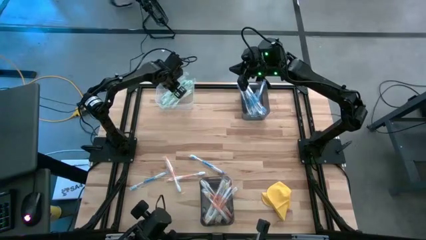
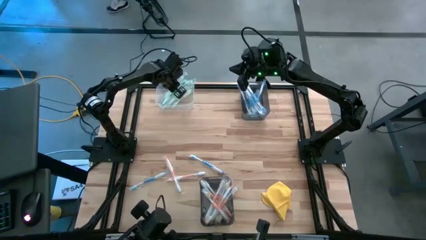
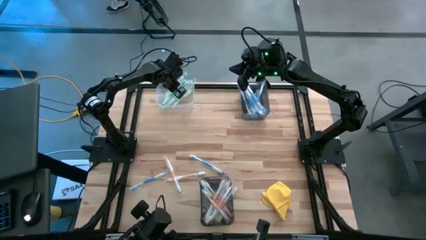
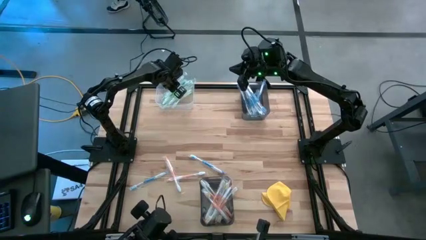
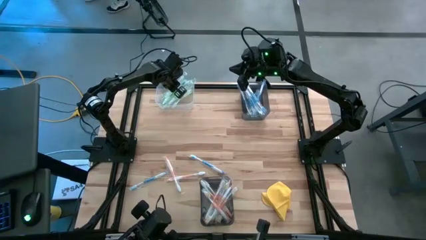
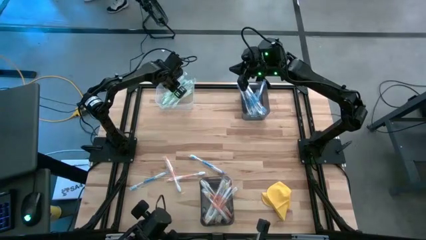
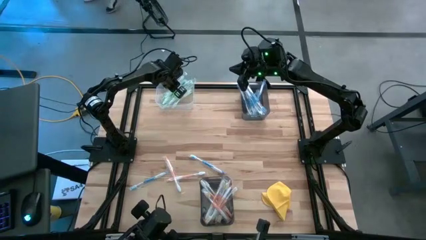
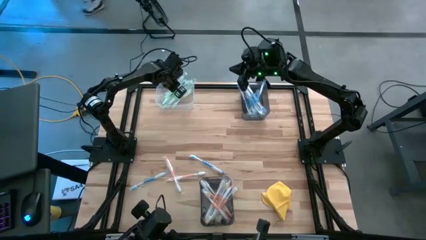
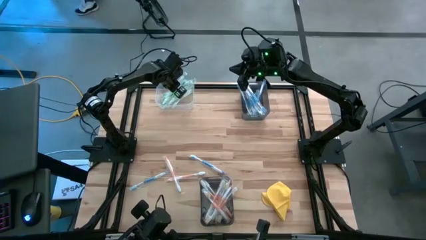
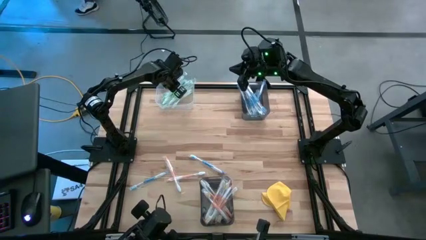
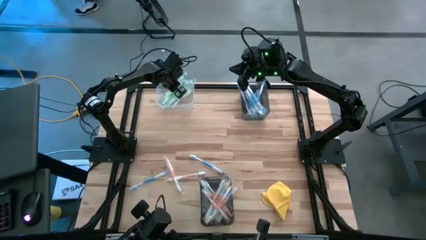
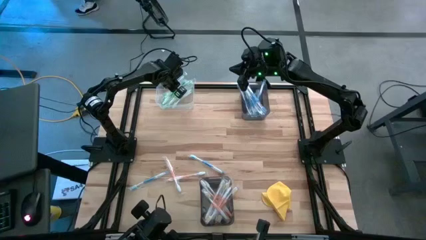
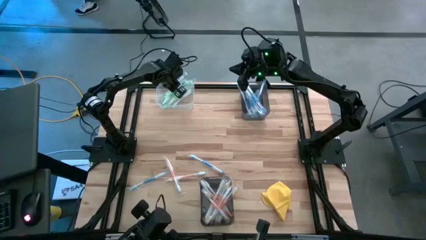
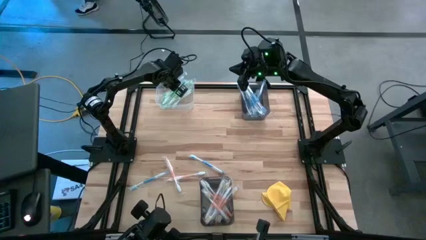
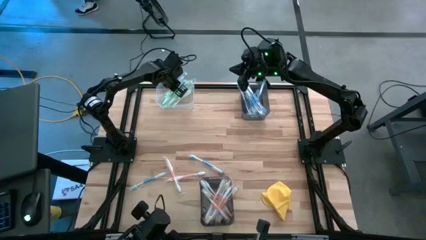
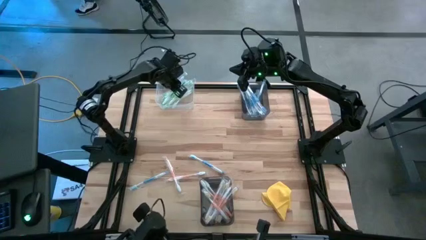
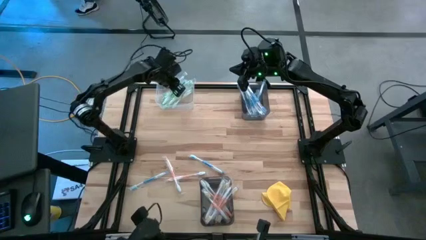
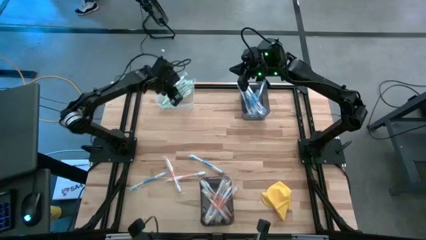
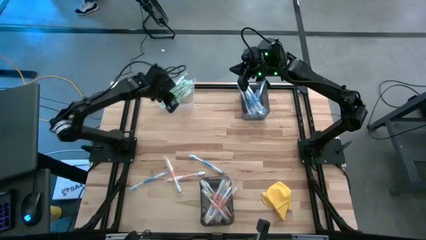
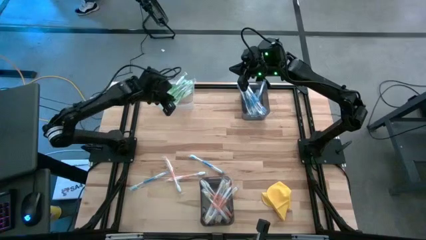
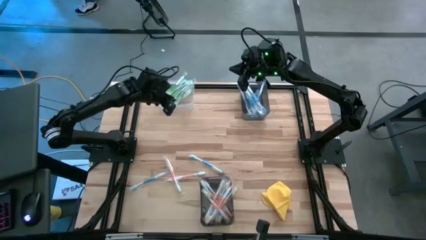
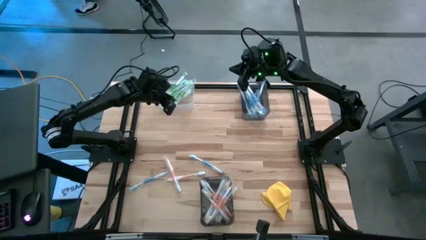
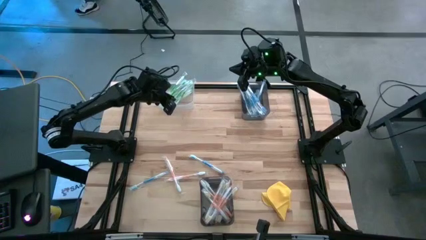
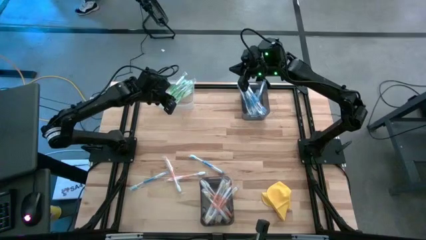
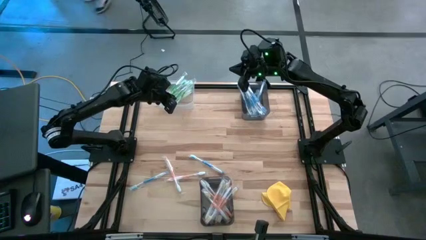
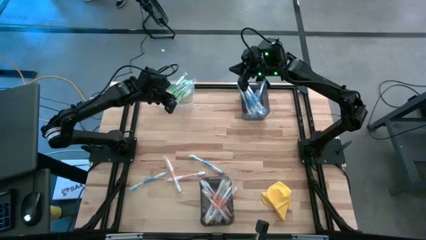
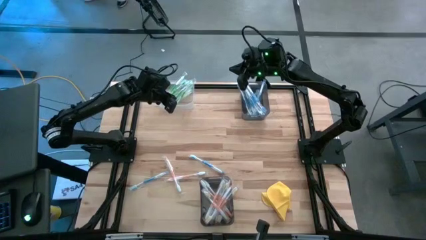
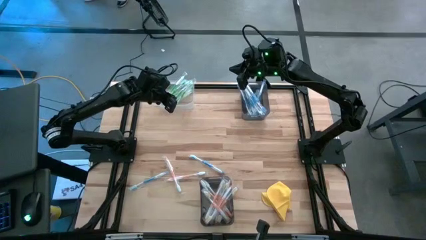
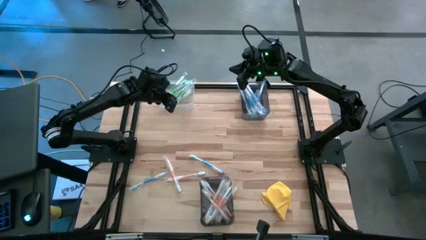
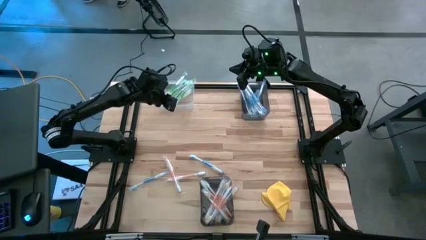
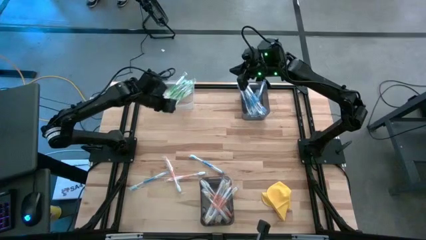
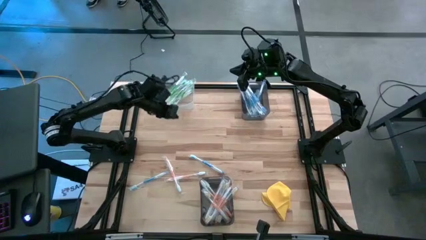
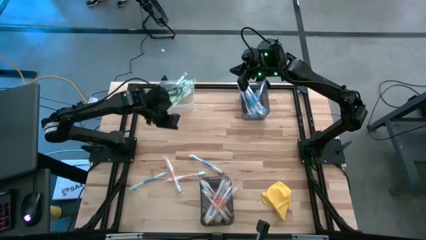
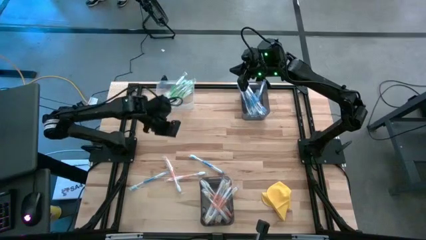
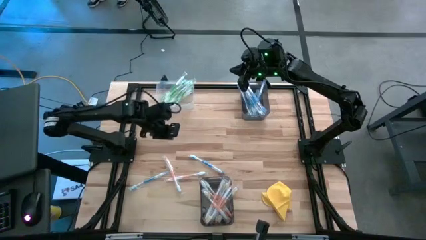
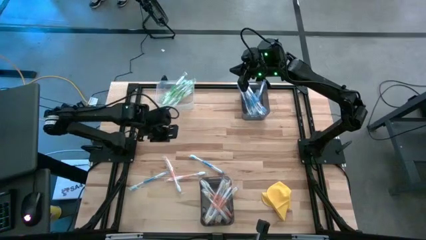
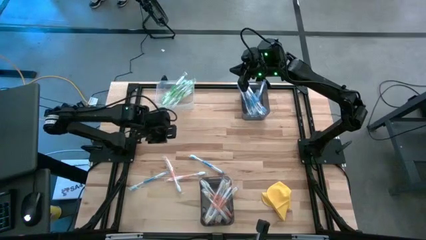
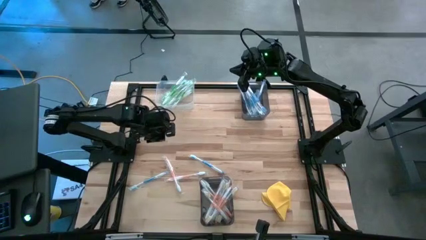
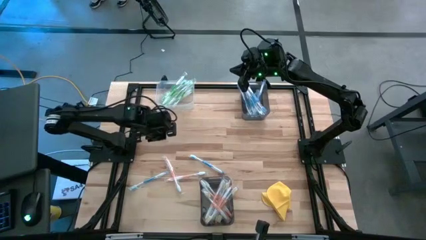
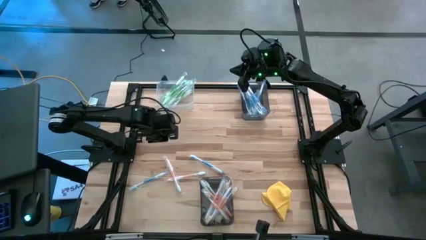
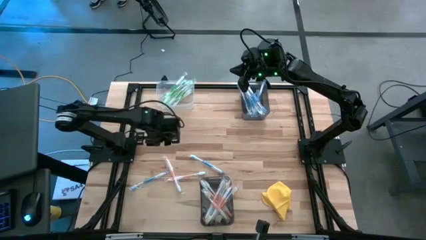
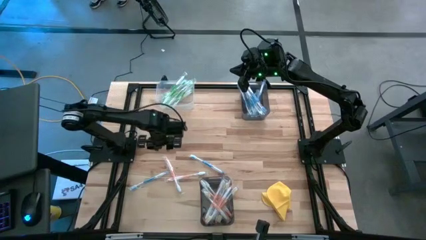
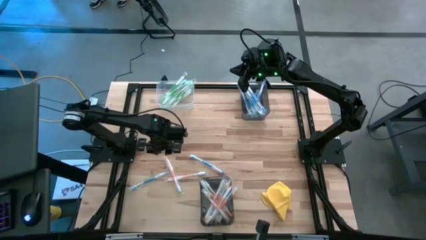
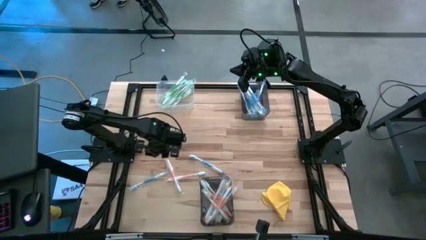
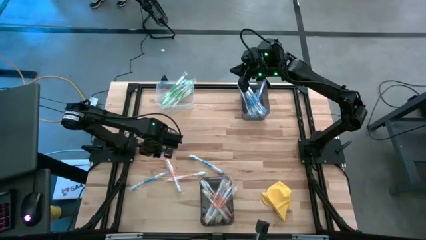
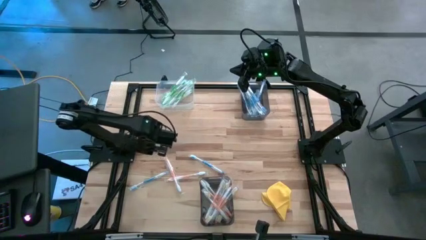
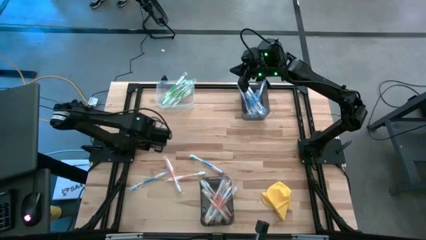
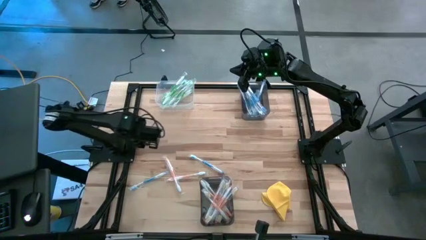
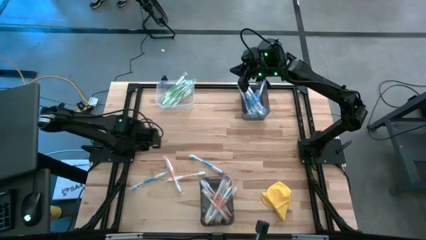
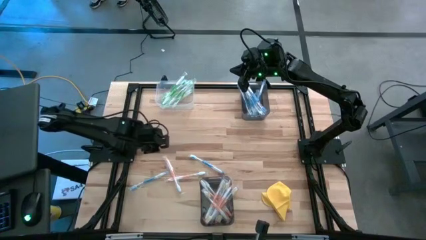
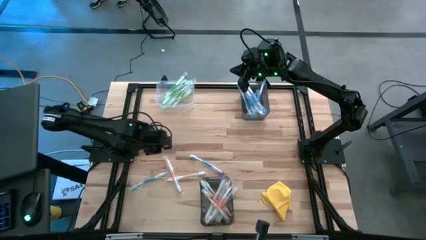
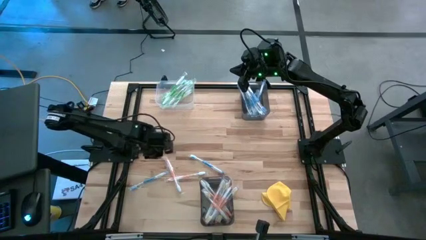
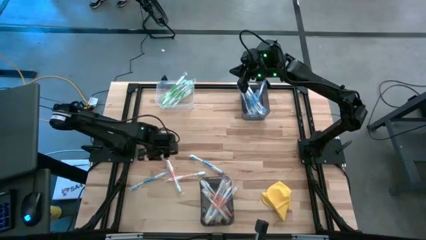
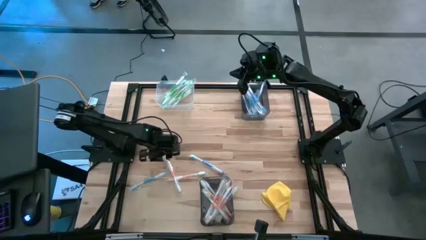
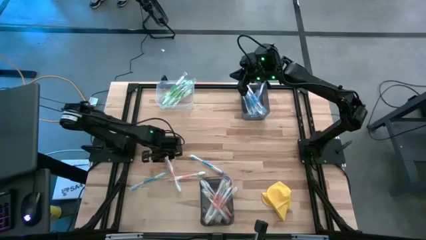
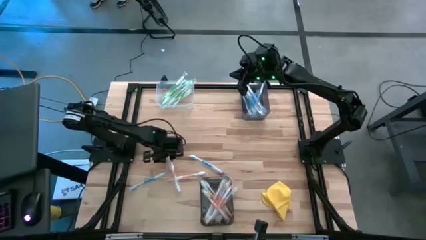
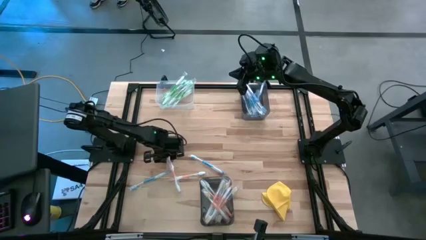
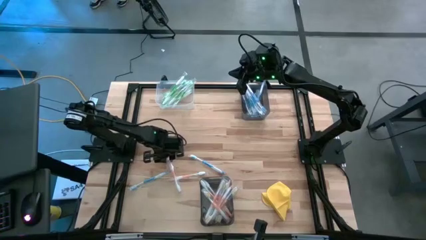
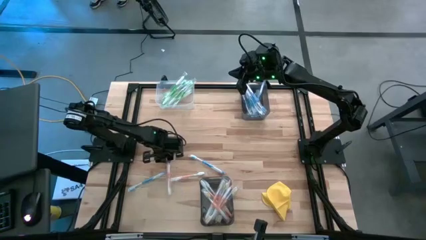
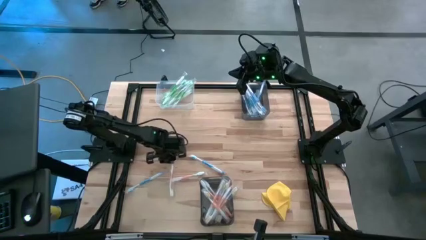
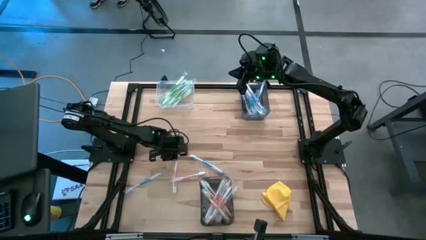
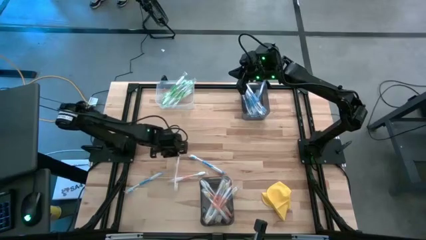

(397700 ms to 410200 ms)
Task: Pick & Place Toothbrushes
Put the orange toothbrush into the bottom black bin
